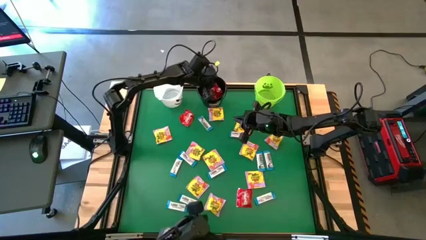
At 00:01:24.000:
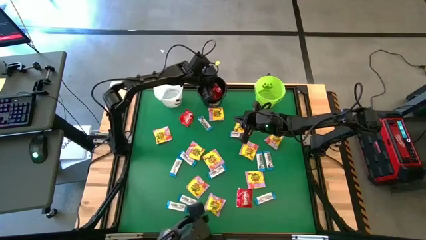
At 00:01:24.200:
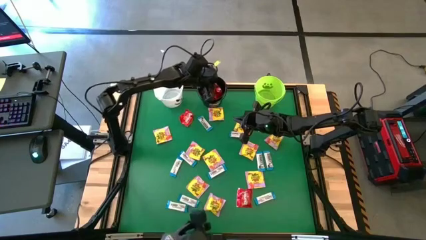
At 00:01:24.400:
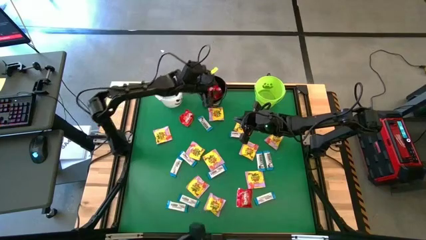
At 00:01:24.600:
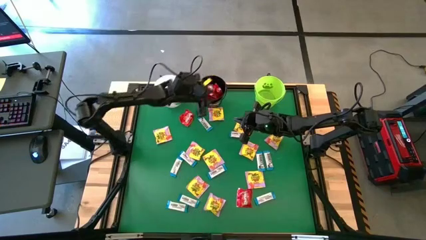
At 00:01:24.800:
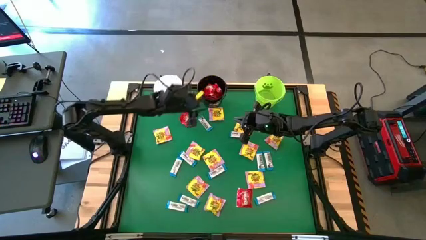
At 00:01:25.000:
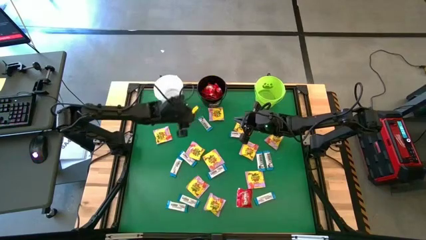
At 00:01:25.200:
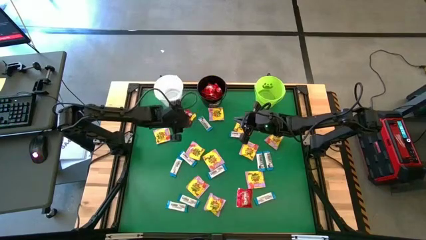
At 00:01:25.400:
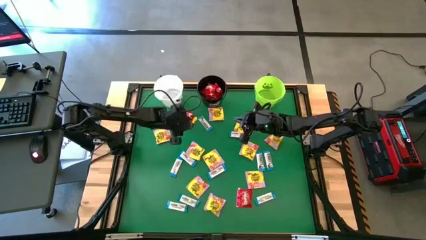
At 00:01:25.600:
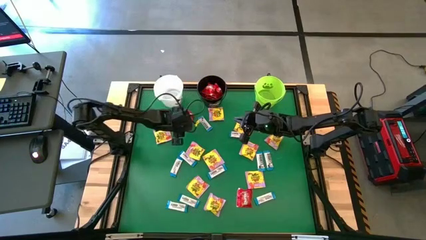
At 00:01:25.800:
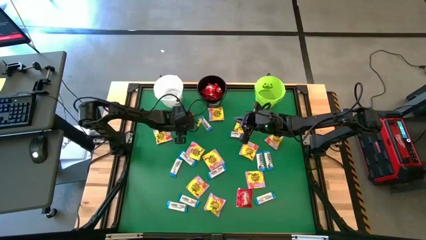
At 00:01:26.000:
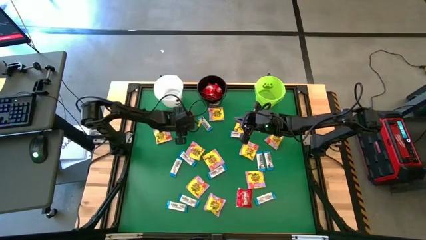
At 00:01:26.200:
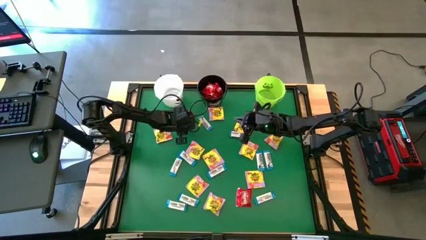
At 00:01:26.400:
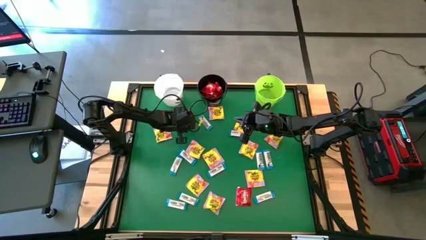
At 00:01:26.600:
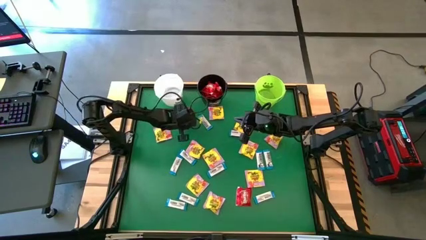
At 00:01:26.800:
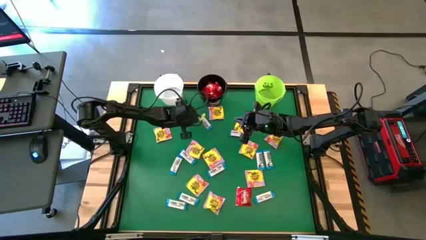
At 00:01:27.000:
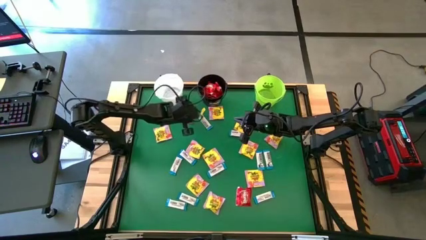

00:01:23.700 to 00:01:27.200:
Task: Sort candy by brand, put in halloween buckets
Put the red candy into the black bucket

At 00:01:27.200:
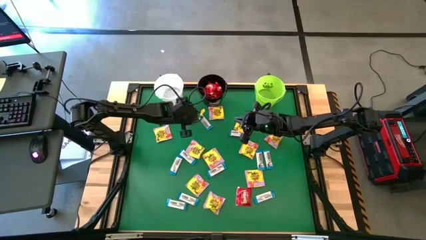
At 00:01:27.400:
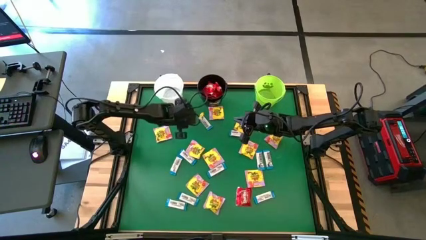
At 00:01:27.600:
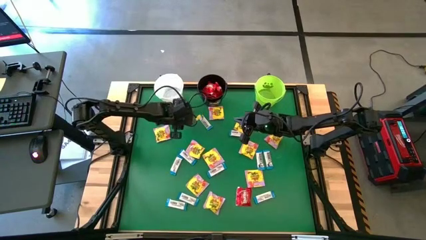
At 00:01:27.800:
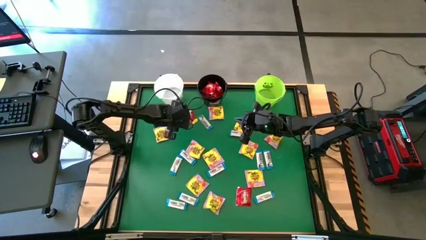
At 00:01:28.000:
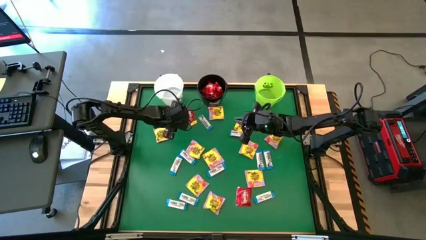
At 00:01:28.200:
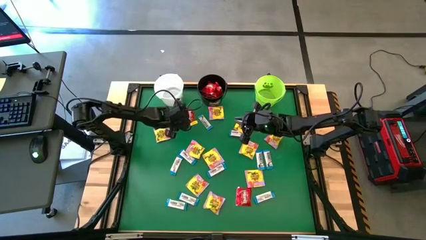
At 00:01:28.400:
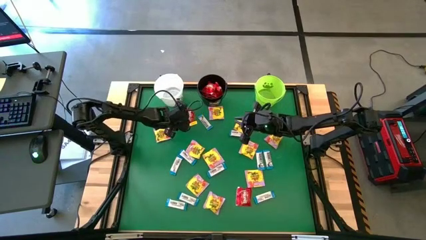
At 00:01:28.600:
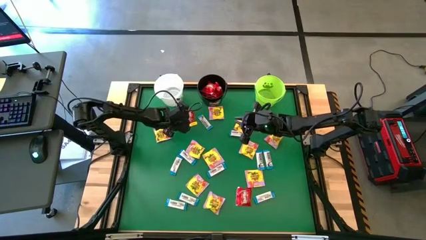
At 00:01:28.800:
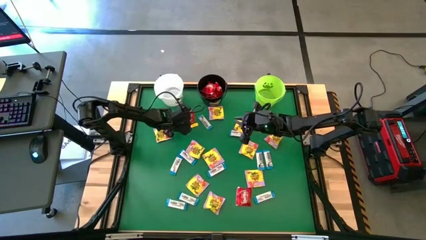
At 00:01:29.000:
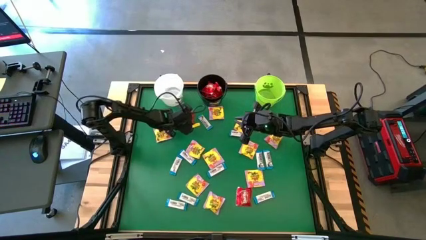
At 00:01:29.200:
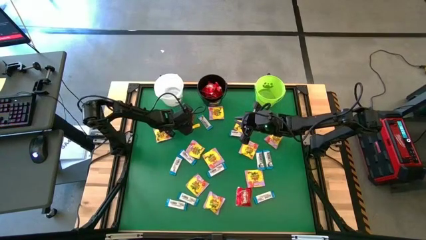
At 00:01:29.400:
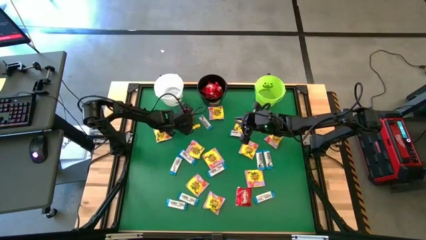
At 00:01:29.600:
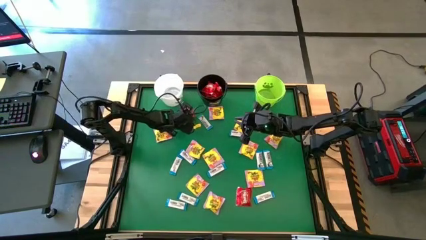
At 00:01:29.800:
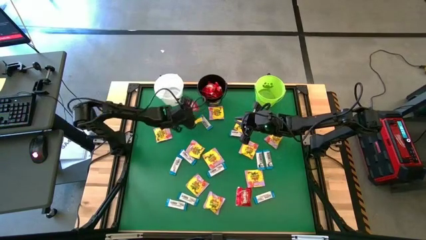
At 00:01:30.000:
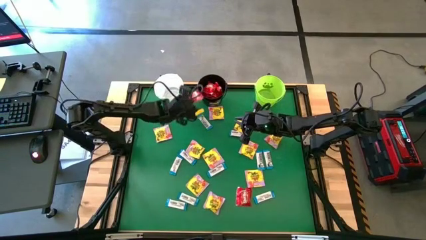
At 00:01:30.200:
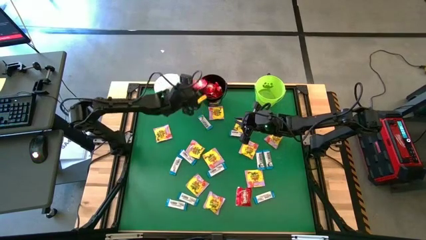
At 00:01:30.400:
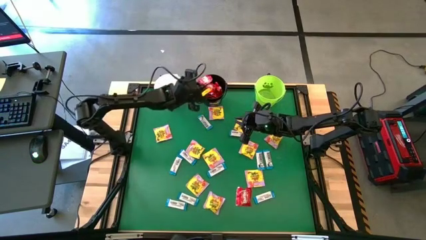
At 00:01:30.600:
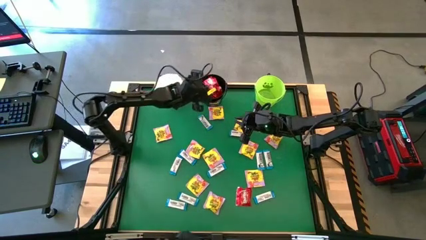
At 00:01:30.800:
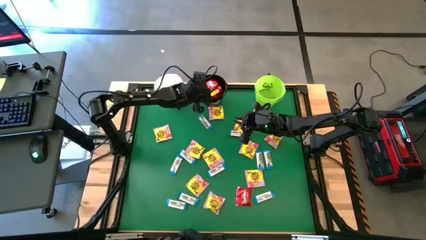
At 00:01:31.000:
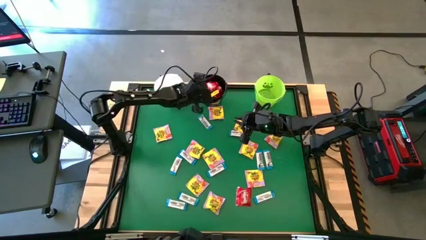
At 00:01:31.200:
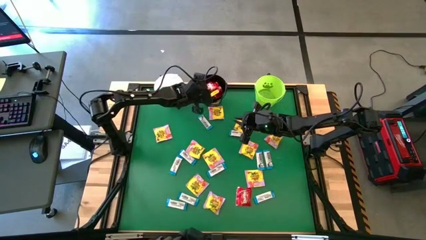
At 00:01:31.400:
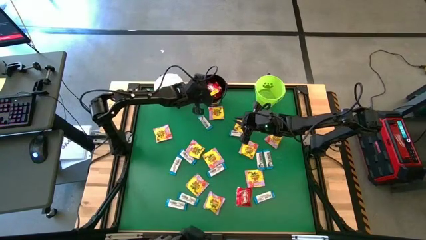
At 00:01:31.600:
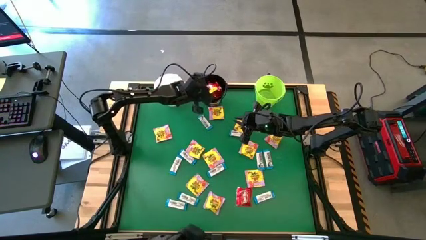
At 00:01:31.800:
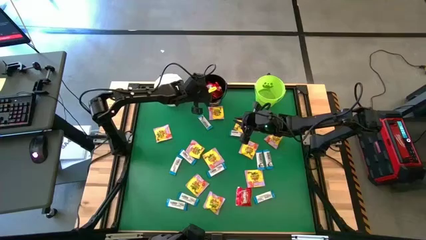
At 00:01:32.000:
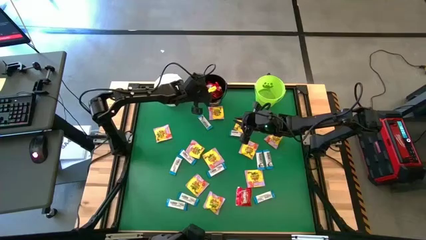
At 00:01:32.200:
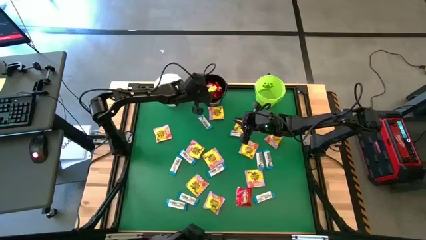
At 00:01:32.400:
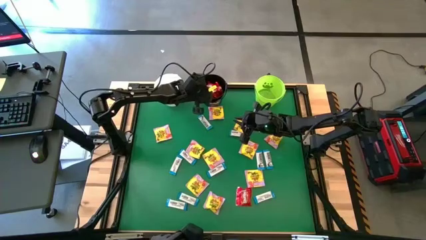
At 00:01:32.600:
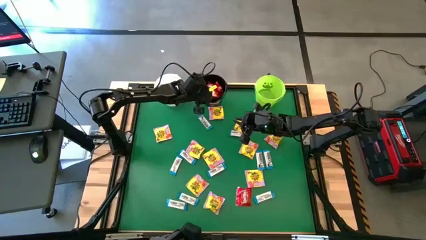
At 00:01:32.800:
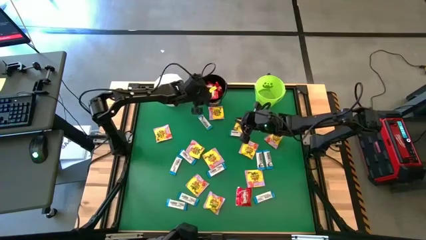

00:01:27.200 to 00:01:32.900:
Put the red candy into the black bucket

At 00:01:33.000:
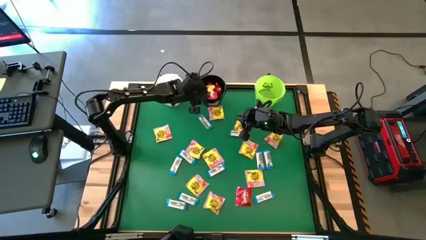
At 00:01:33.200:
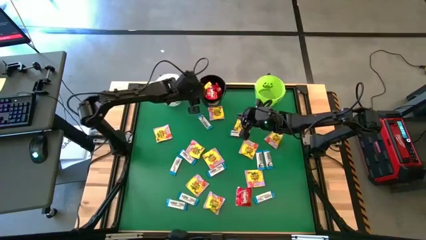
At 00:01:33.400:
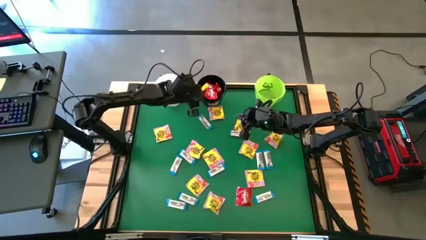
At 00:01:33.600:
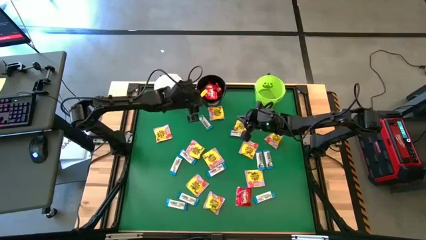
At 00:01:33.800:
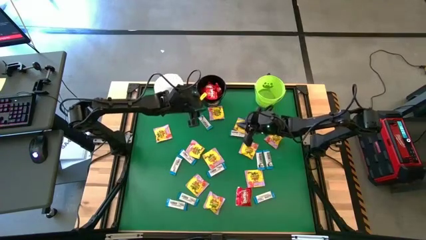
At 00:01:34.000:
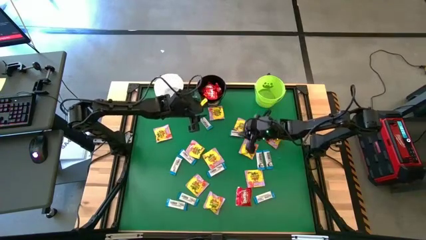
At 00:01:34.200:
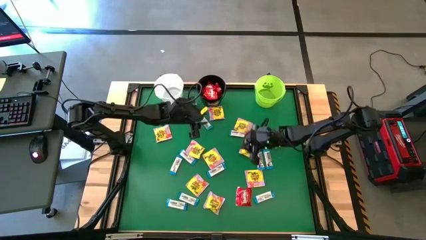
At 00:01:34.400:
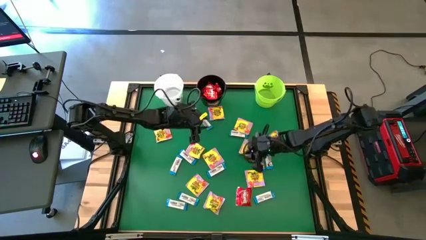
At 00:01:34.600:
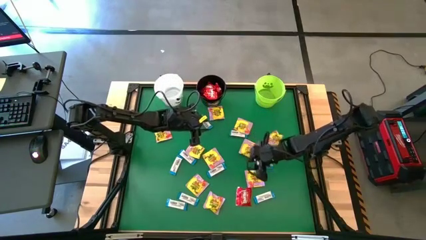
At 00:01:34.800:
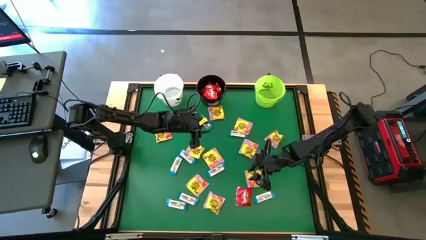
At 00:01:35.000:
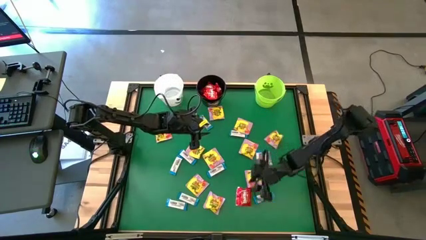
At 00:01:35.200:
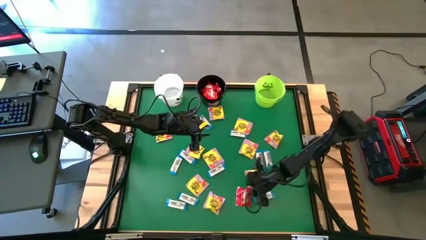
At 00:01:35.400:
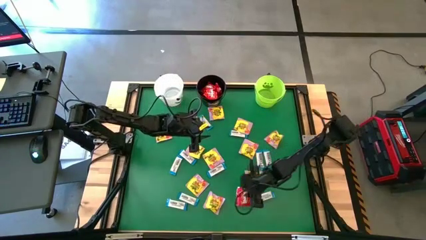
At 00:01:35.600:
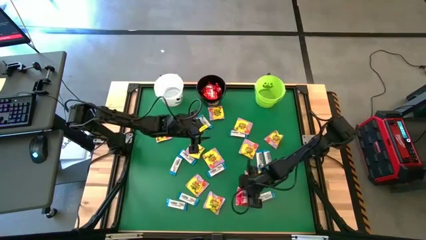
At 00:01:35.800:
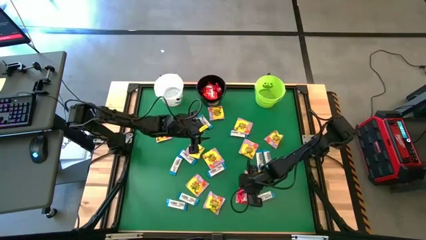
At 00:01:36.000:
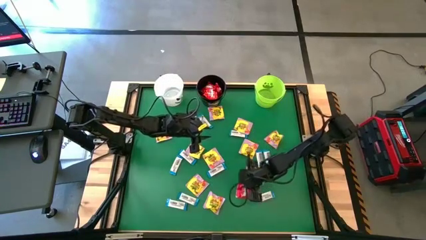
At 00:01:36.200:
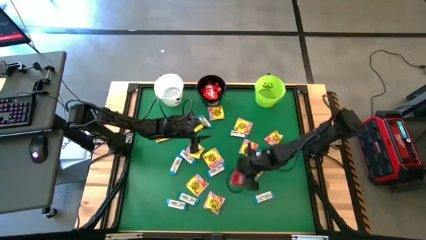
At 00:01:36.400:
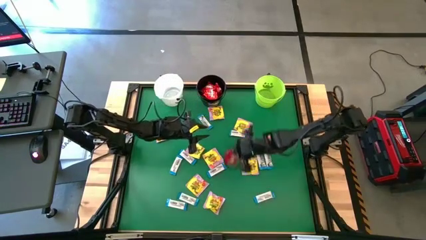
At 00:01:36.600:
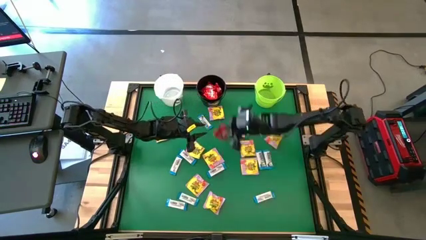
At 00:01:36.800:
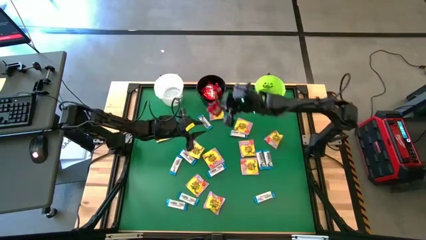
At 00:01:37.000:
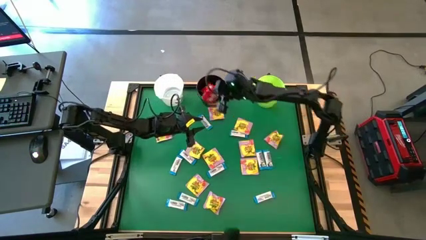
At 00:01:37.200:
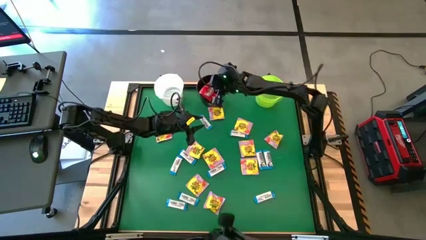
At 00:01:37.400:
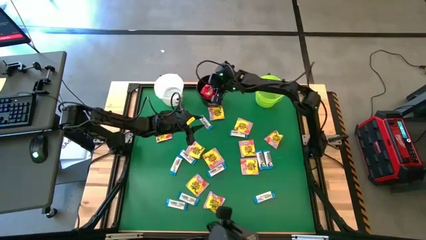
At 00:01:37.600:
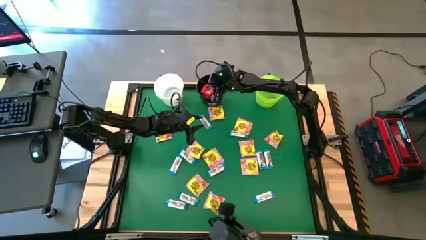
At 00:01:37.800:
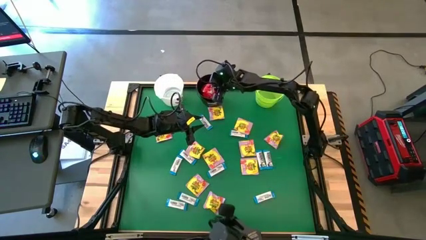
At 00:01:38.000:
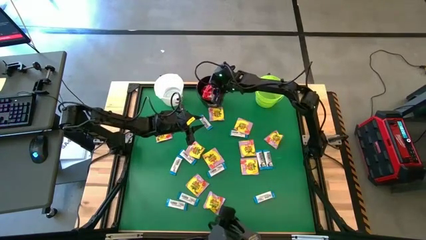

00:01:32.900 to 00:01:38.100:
Put the red candy into the black bucket

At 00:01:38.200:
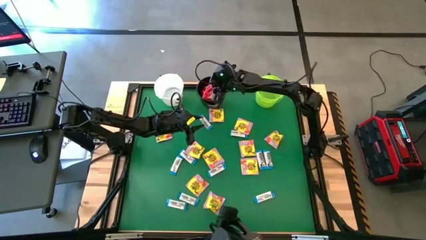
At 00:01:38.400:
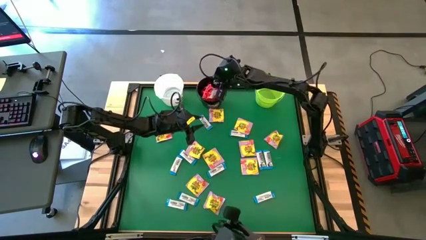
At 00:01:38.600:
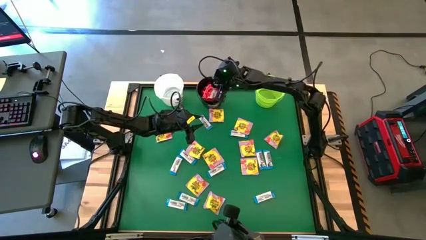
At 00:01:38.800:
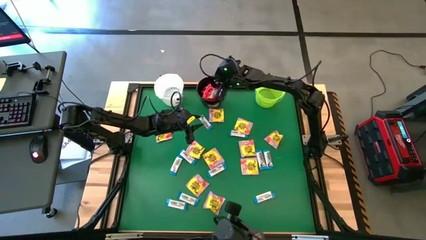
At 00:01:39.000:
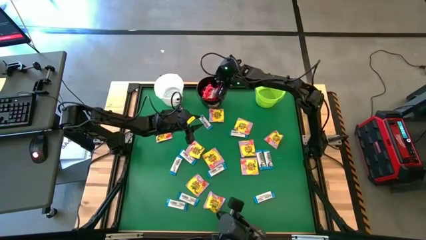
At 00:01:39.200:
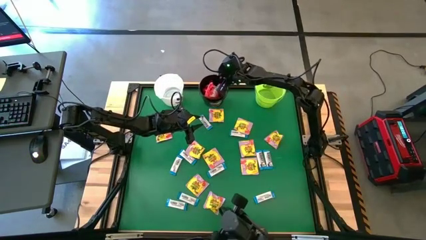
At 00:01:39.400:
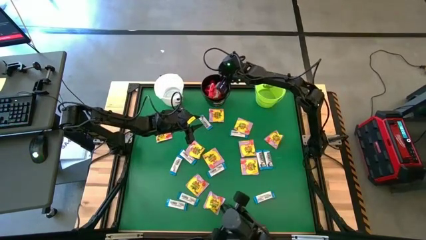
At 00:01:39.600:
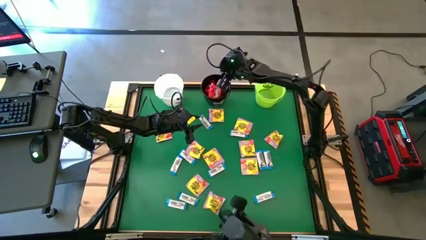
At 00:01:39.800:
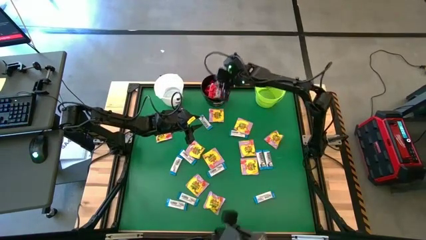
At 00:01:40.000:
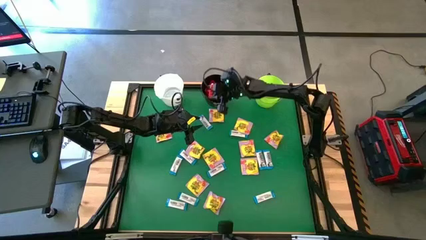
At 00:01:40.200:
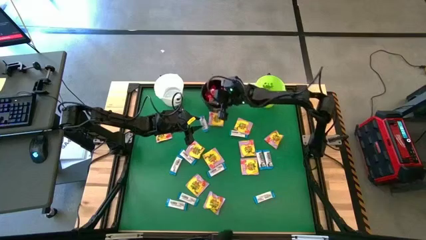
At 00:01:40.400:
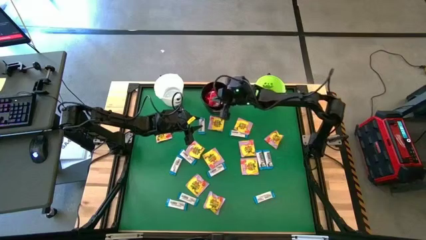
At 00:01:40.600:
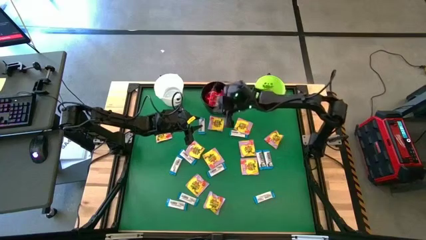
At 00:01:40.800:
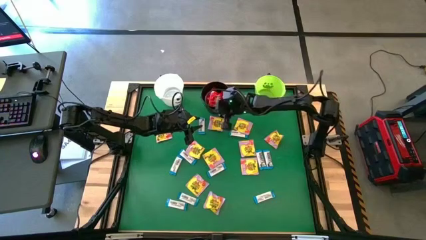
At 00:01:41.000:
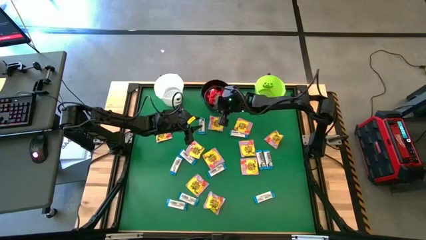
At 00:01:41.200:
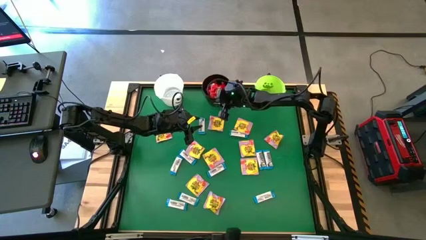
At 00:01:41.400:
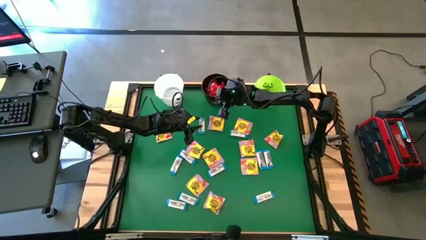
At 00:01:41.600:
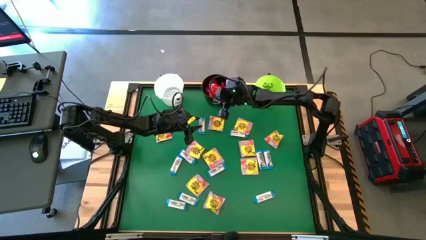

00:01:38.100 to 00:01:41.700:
Adjust the black bucket
